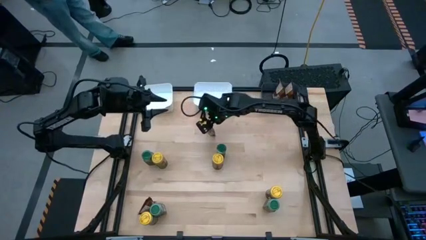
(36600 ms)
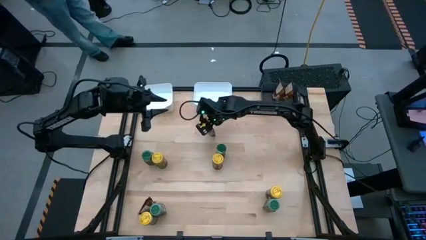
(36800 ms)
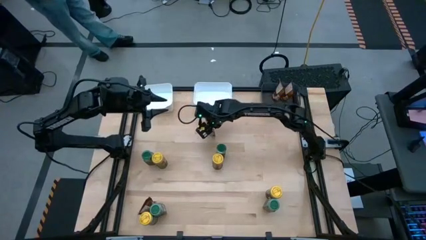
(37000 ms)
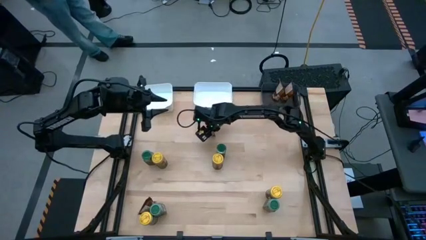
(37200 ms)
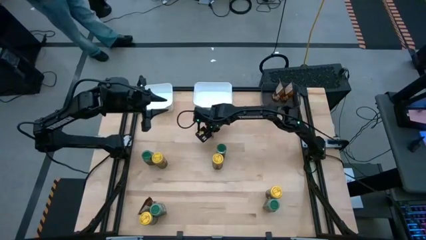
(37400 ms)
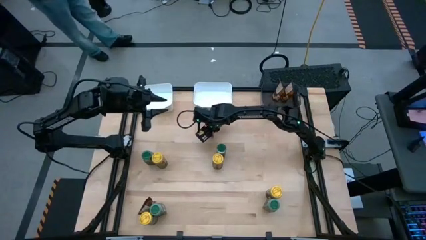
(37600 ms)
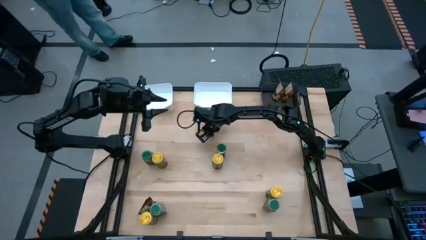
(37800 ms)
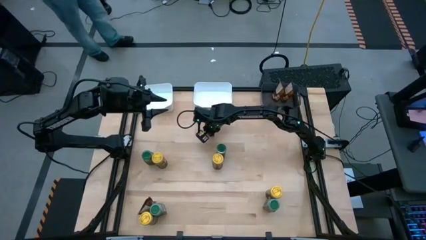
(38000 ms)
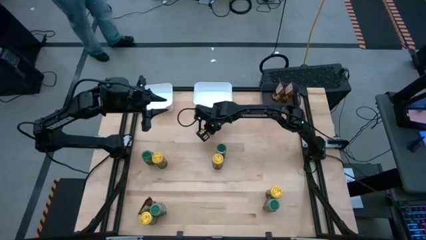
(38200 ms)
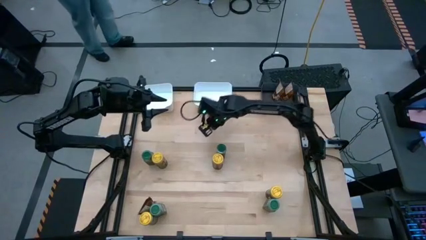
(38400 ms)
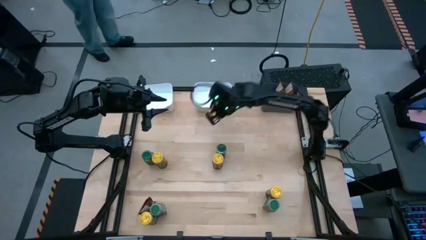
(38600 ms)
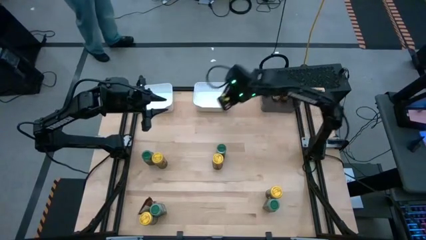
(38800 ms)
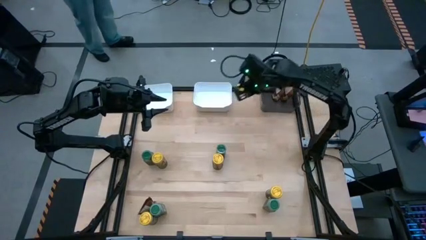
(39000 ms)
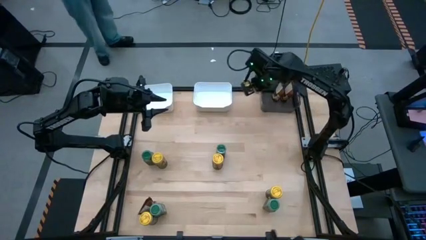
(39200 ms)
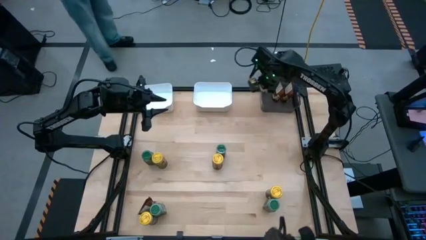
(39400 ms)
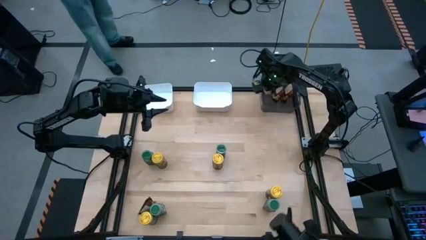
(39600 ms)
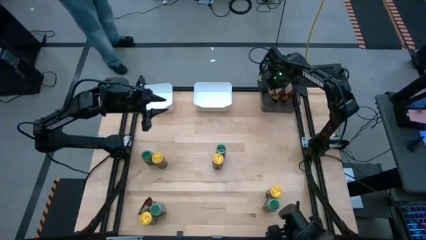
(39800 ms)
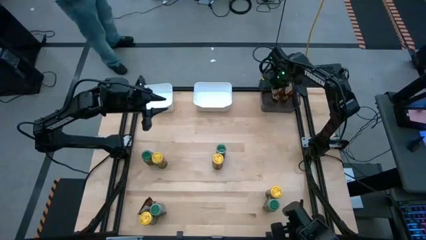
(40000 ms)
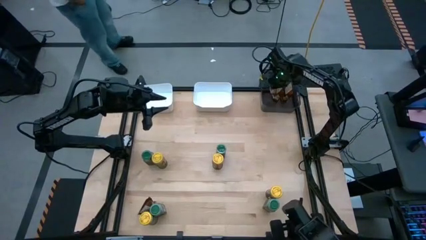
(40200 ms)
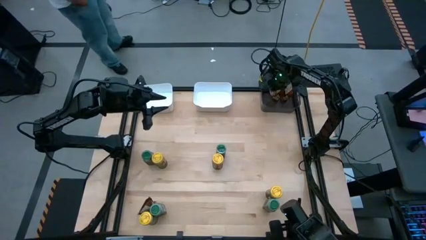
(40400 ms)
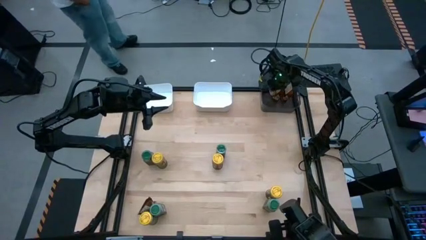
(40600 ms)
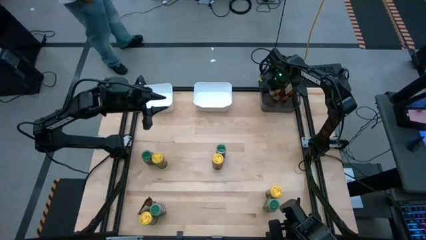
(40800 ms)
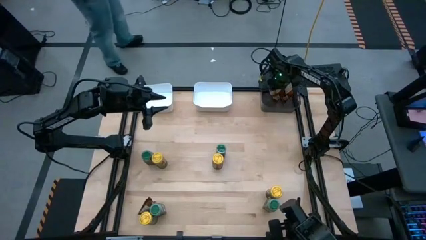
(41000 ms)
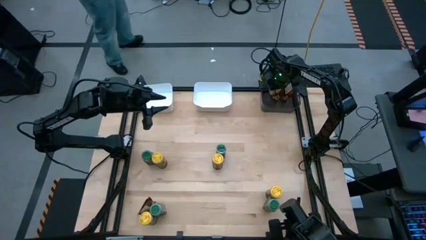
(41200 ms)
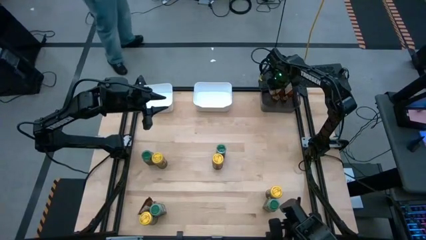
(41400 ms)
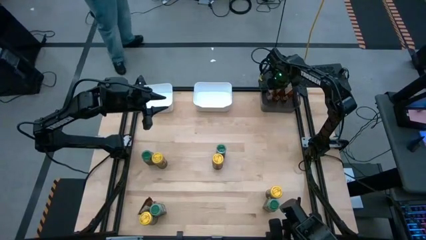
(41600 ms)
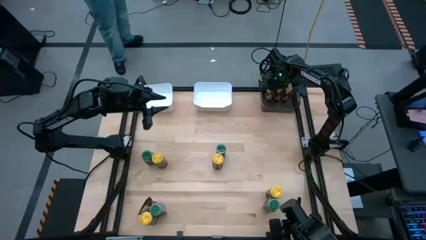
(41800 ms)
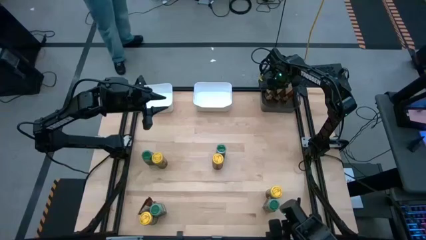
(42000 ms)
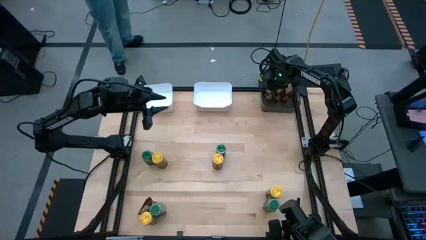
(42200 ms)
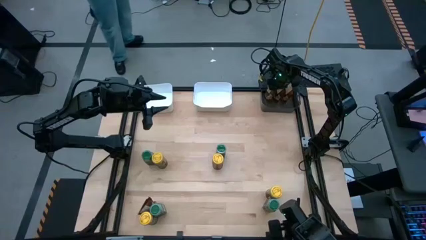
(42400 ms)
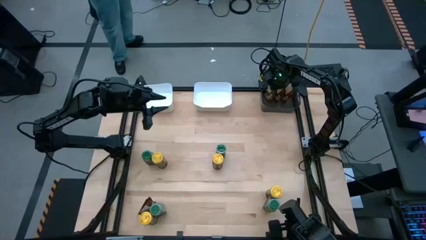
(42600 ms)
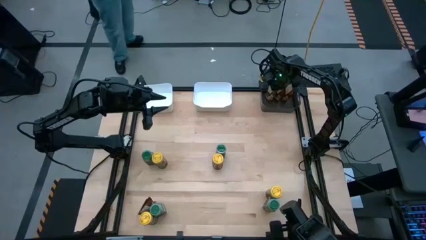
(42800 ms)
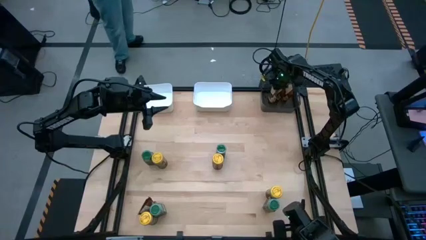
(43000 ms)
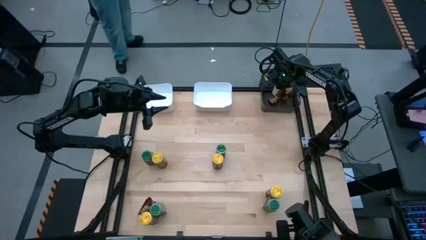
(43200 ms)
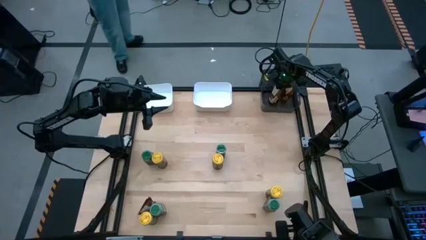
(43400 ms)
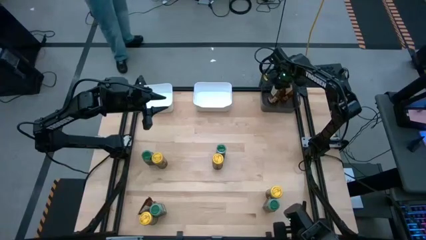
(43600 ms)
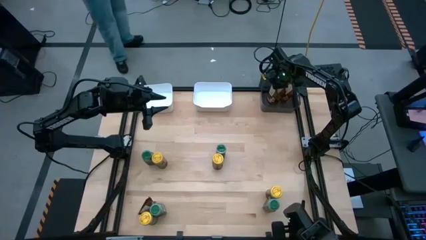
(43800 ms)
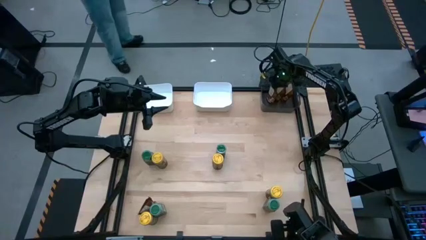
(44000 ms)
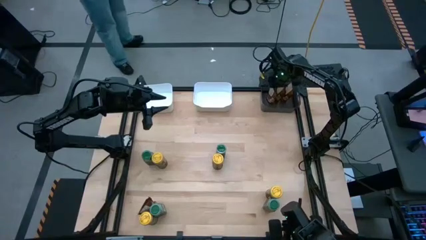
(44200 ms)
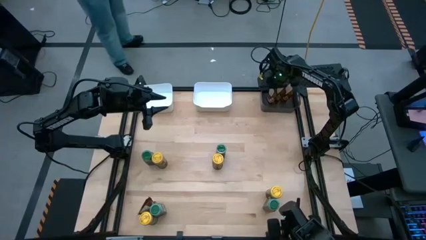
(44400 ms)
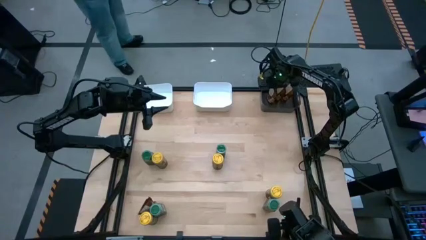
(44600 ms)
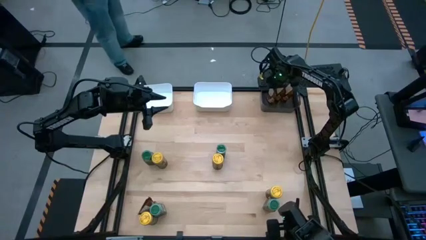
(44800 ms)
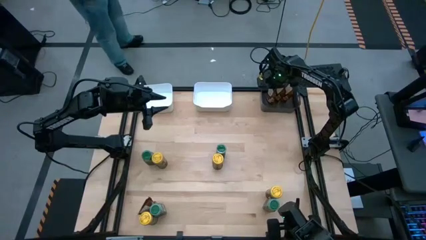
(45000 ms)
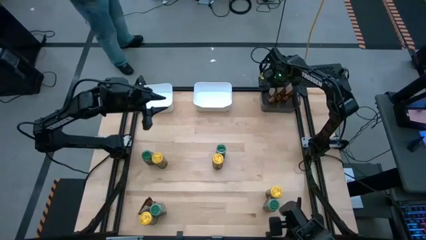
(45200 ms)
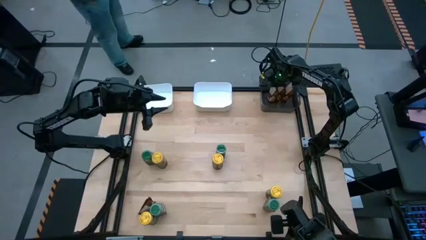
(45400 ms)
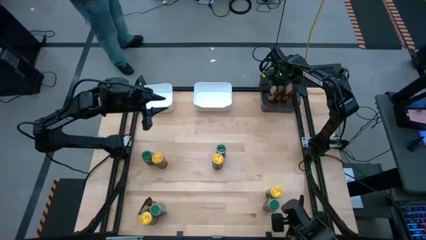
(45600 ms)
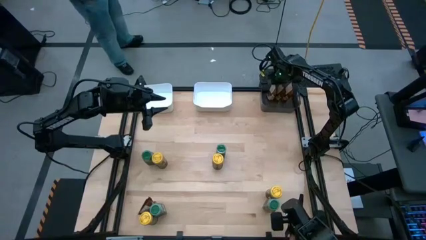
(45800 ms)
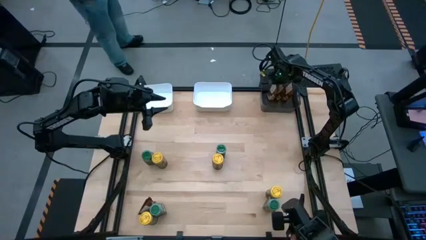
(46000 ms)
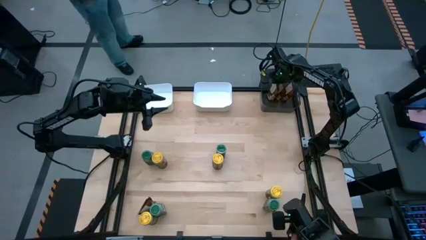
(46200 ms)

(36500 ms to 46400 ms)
Task: Sort spices by type
Put the top orange seasoning bag into the black bin

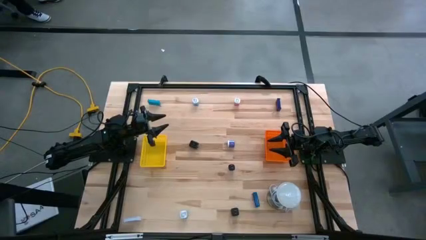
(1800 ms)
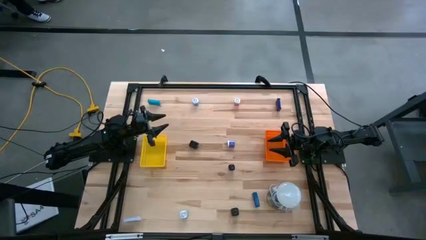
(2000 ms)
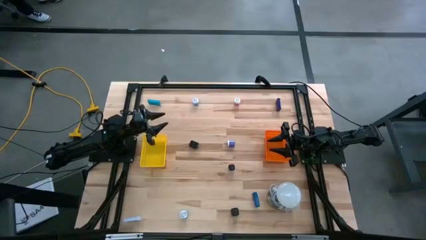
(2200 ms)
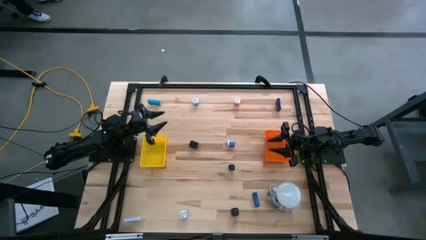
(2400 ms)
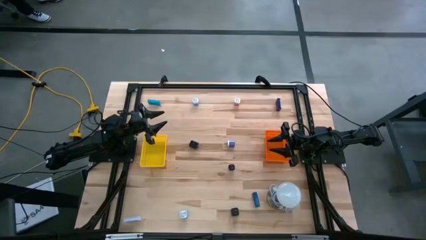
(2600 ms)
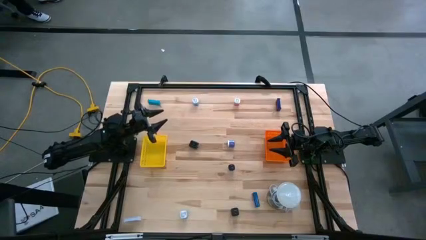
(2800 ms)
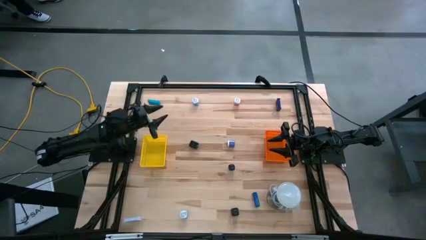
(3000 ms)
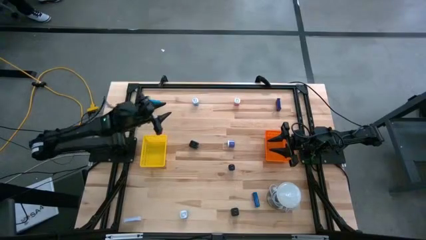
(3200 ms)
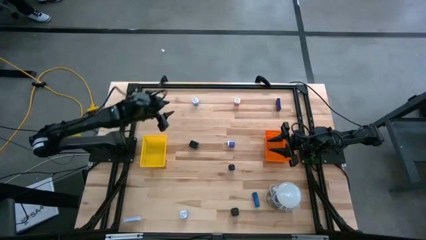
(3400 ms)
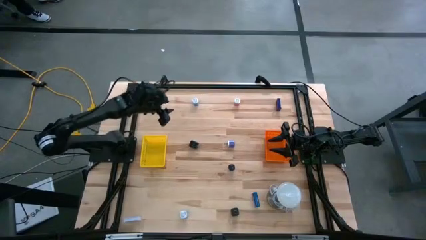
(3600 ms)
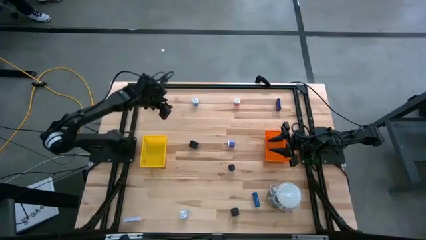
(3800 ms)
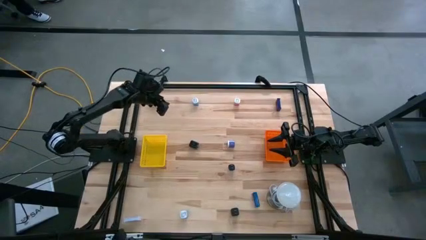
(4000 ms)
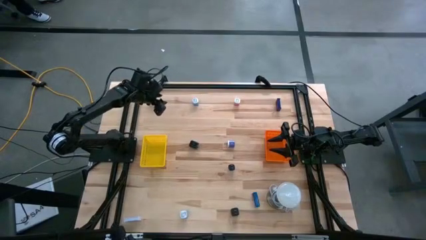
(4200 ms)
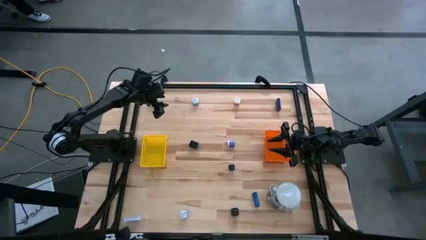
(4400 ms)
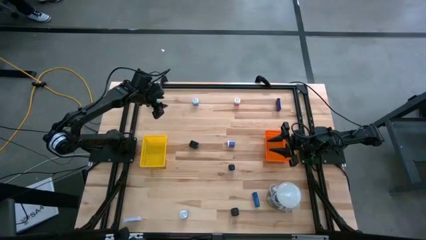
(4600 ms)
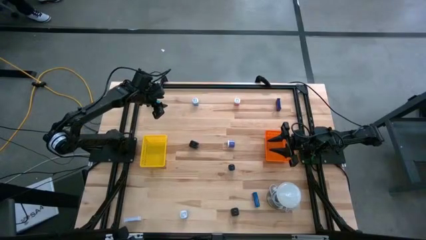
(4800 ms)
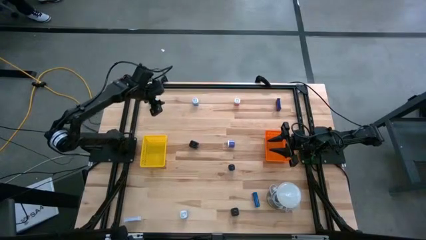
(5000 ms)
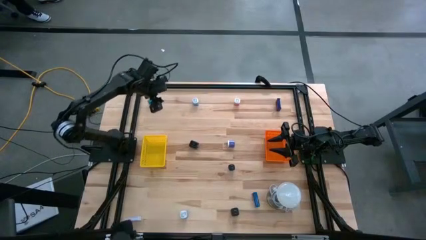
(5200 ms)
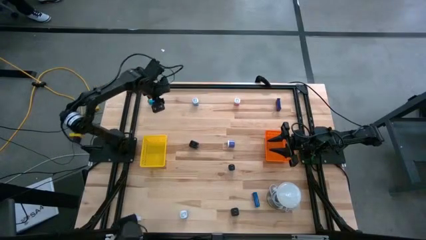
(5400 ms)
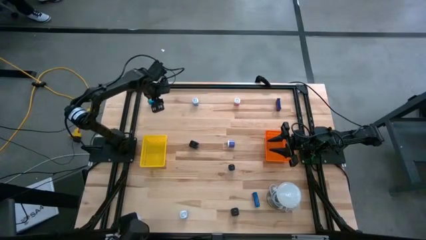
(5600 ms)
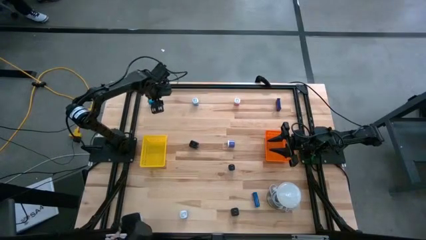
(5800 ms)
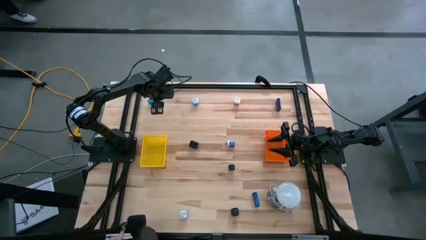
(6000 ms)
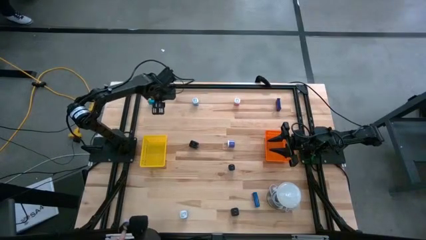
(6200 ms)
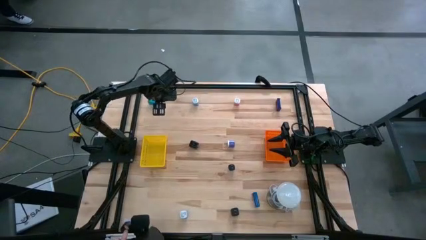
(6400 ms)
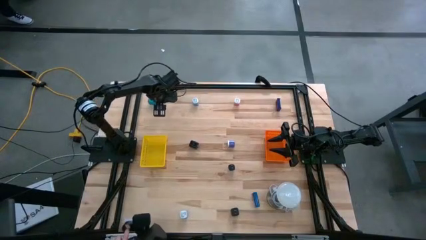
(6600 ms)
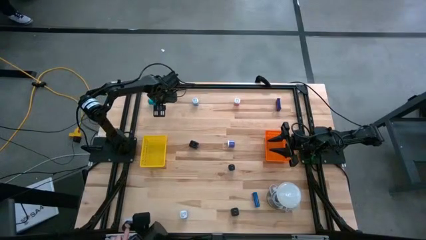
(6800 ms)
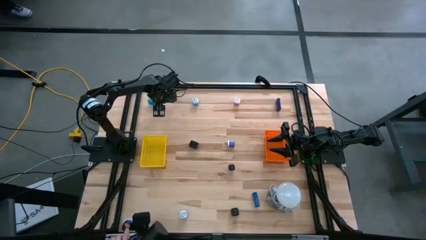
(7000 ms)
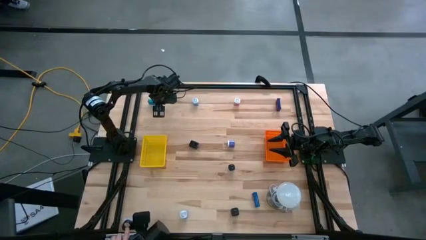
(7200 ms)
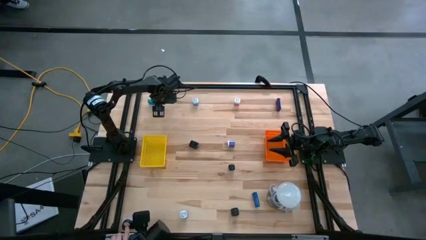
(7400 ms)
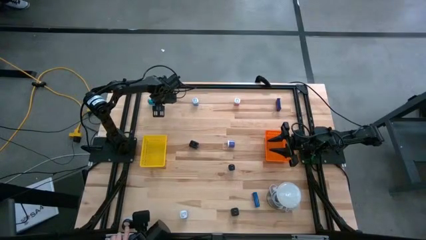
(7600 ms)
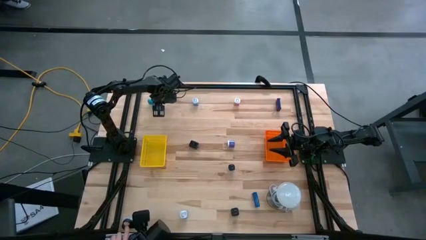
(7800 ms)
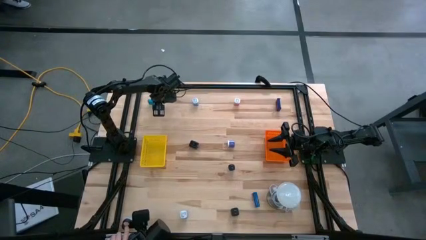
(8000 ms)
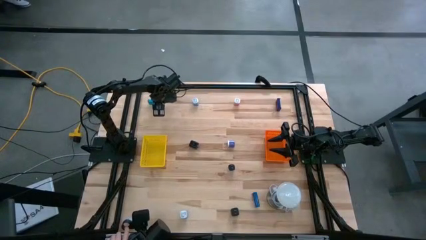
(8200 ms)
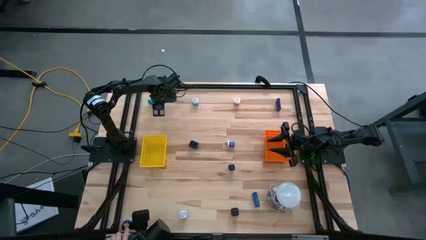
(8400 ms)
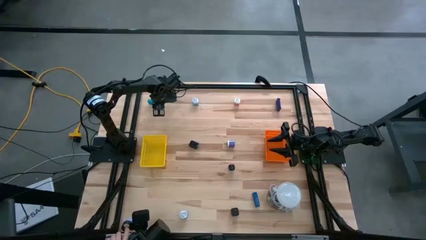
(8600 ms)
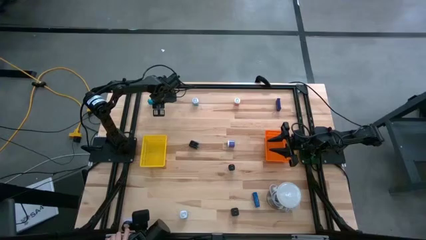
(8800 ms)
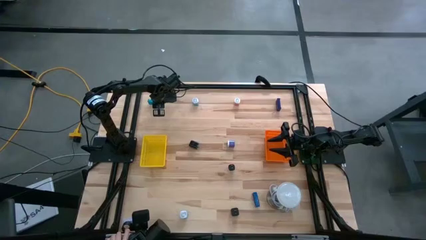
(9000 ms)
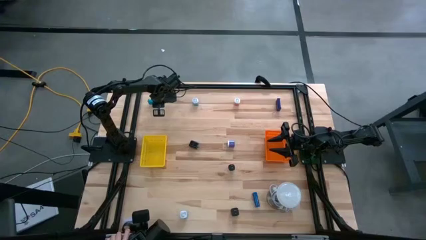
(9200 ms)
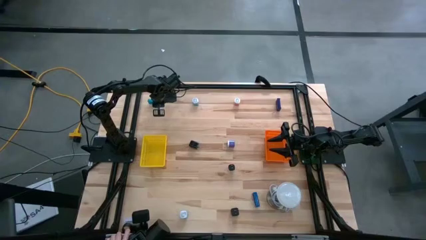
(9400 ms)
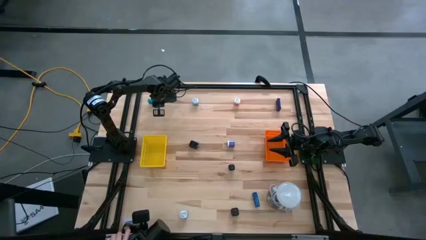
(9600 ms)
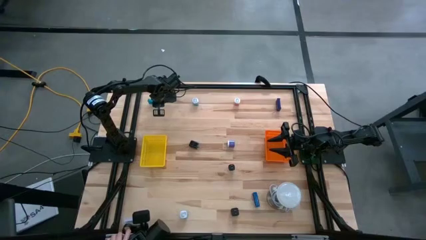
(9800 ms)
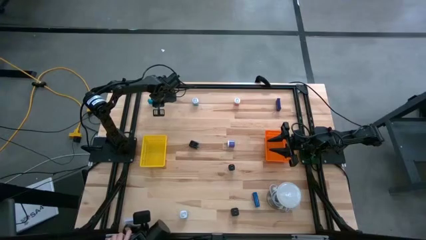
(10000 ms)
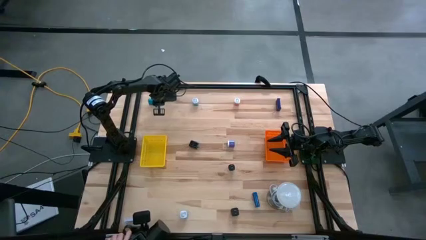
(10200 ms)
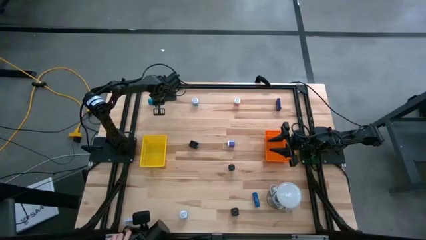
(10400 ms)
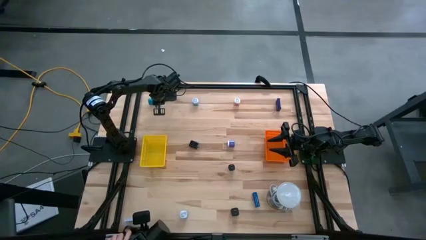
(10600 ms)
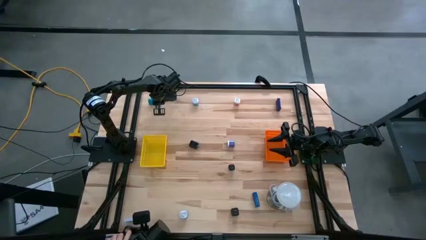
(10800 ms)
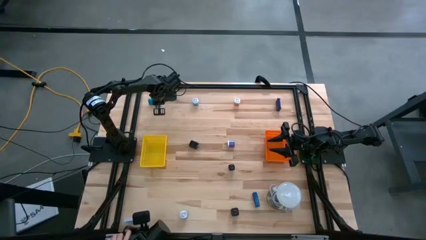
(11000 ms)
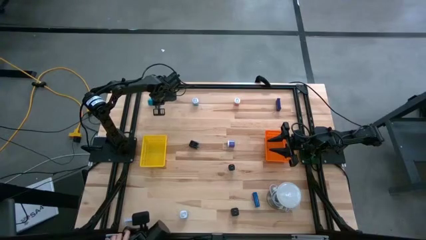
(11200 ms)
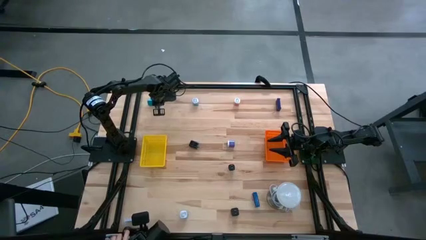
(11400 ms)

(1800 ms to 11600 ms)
Task: Pick & Place Office items
Put the light blue digital timer into the yellow bin
